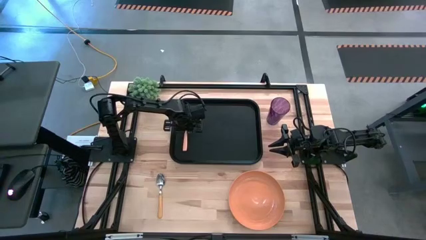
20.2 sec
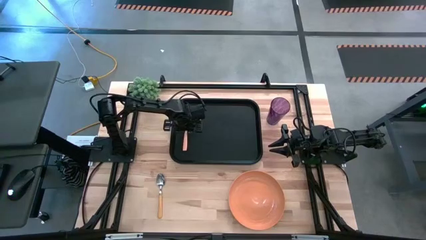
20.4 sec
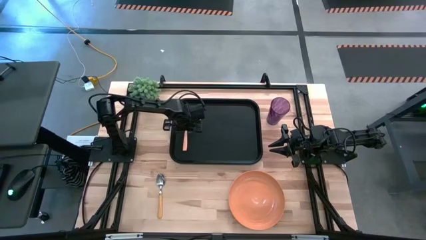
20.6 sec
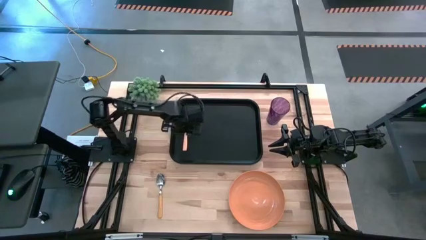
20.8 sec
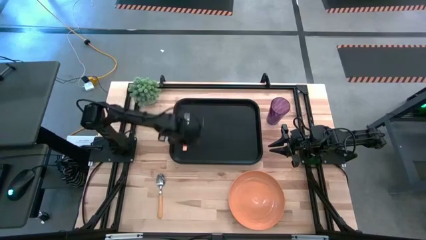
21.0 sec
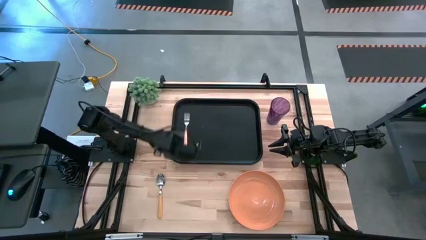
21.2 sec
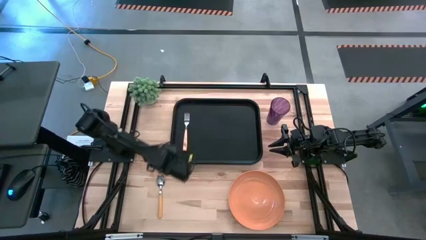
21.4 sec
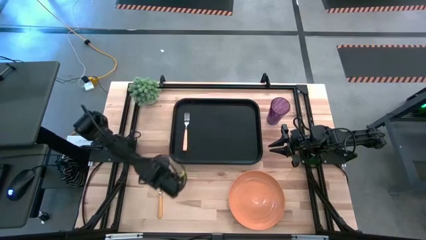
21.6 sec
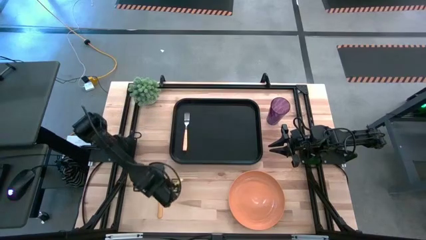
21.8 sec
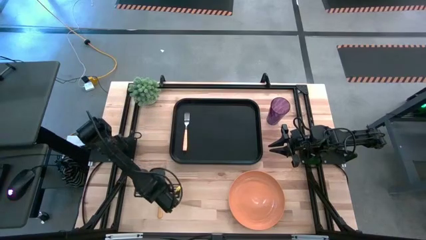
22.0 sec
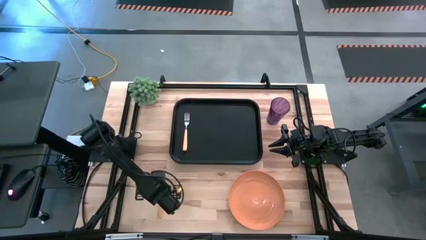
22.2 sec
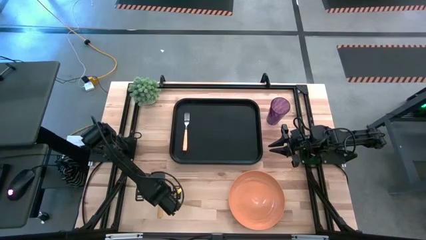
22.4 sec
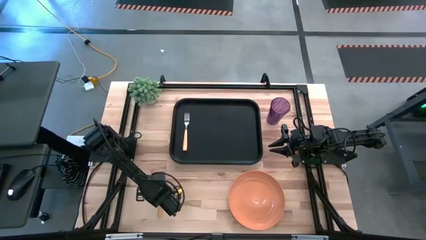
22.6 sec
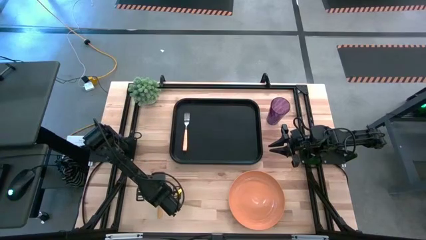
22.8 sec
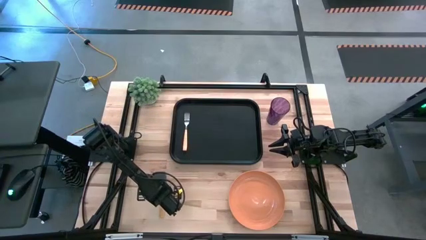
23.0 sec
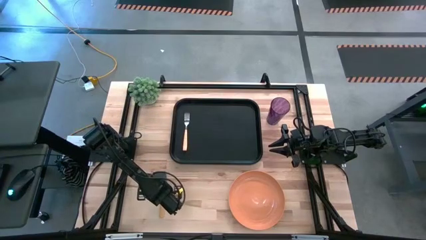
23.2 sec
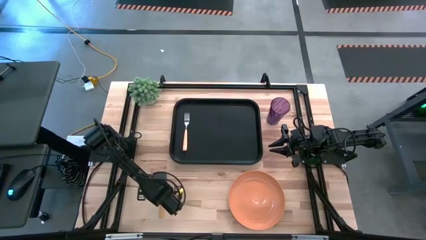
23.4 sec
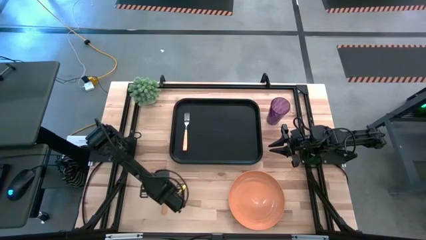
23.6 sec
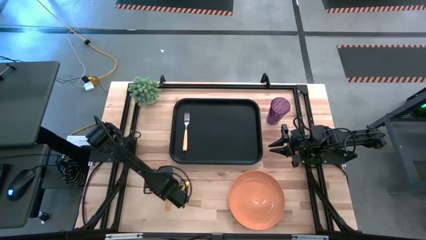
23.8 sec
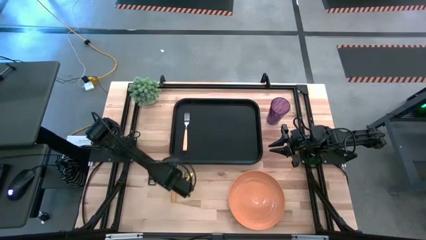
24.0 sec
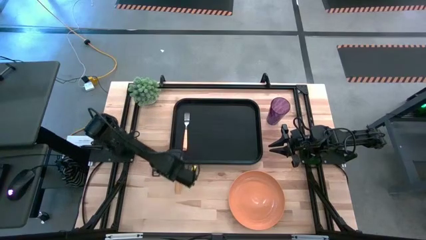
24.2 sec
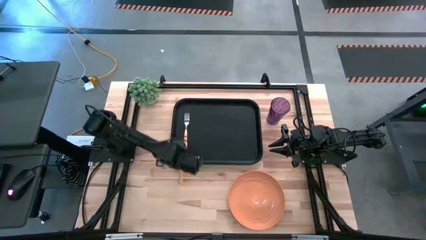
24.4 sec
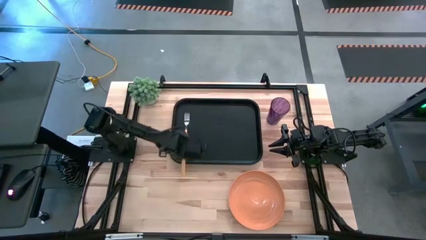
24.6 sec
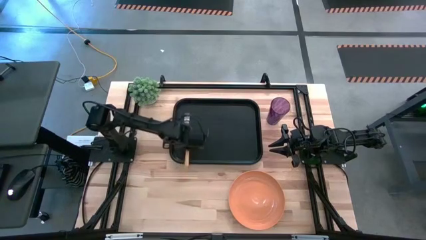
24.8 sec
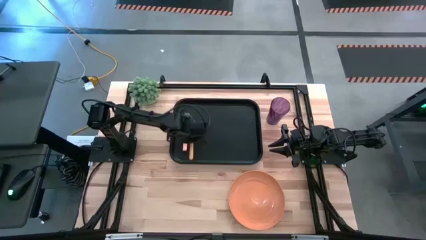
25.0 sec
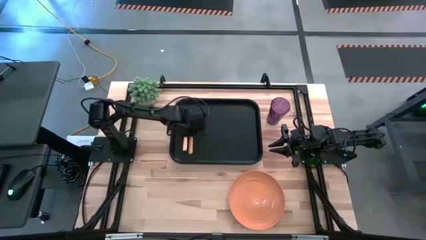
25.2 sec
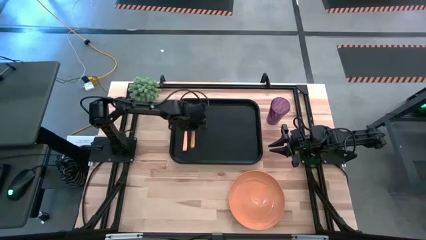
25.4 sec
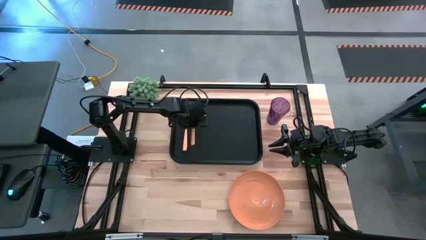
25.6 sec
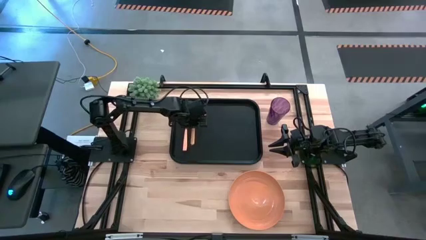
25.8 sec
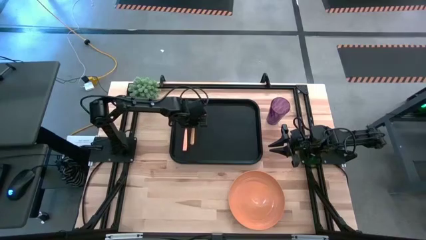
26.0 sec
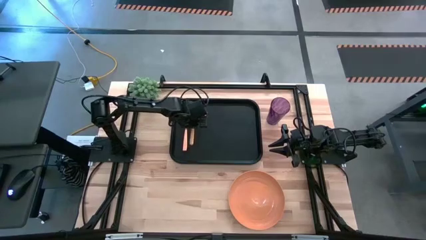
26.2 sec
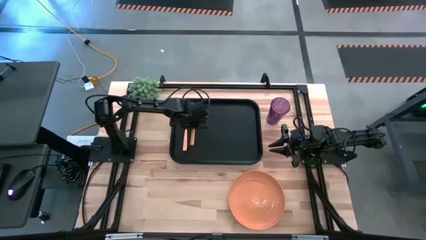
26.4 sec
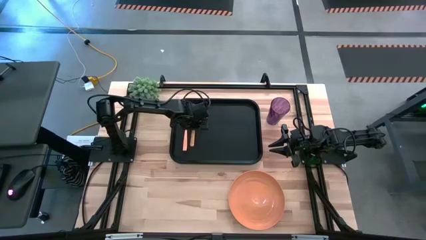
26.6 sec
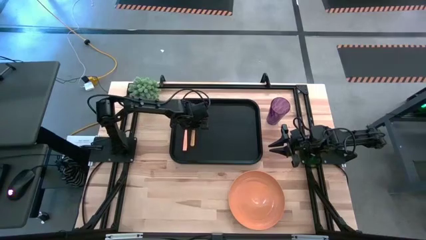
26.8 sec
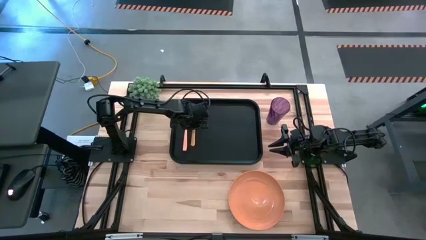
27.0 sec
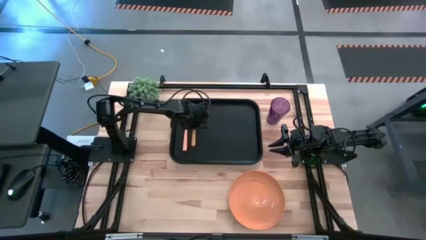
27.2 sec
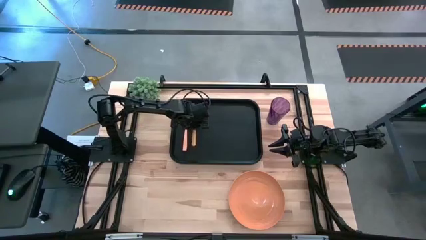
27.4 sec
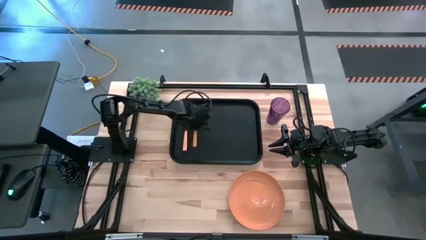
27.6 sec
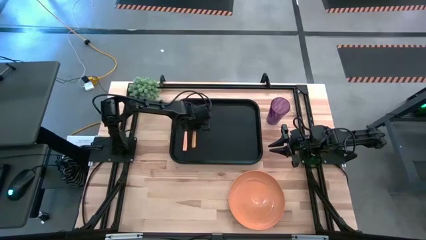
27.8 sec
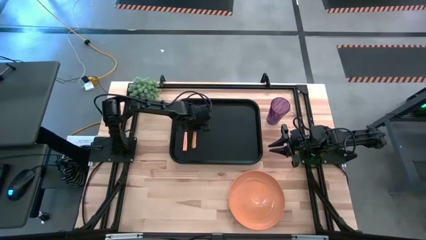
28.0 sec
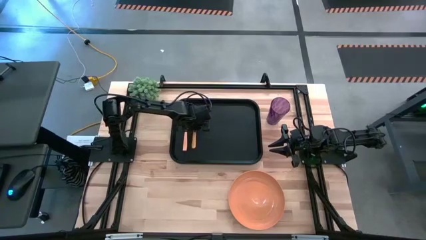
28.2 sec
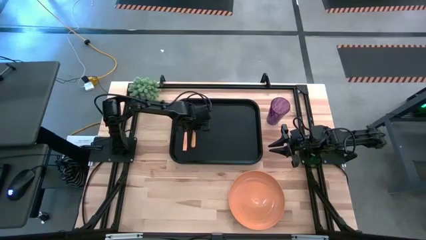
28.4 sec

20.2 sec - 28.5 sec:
Task: Pick and place plate/cup/fork/spoon on tray
Put the orange spoon into the black tray on the right side of the fork

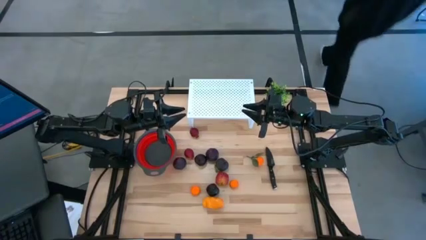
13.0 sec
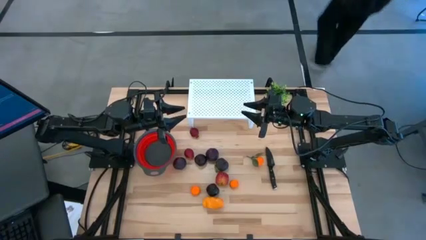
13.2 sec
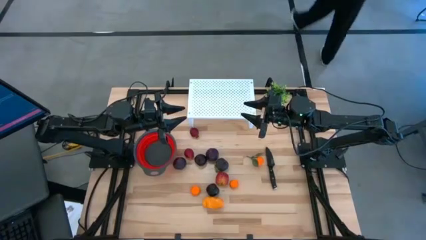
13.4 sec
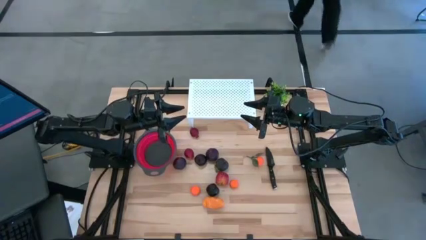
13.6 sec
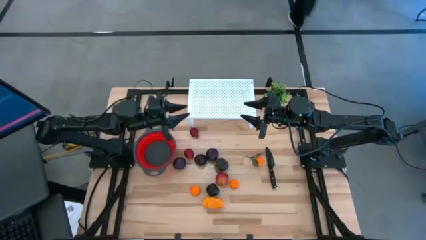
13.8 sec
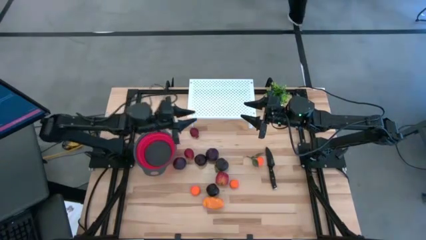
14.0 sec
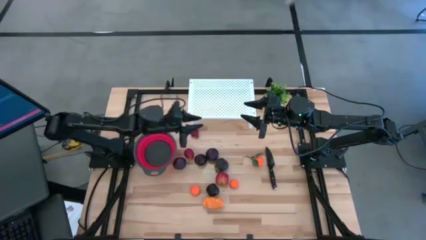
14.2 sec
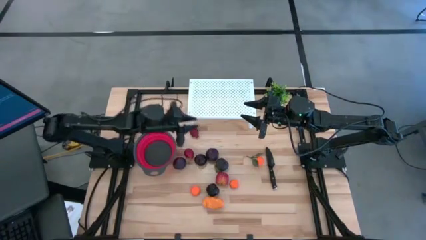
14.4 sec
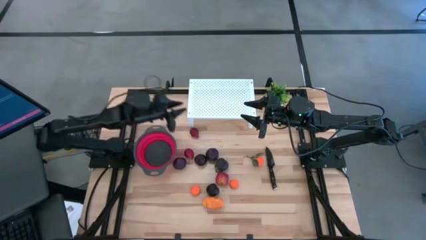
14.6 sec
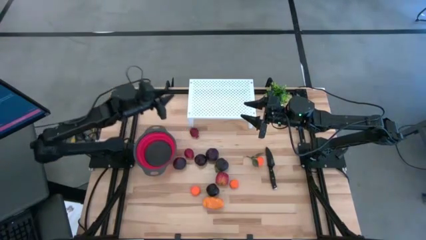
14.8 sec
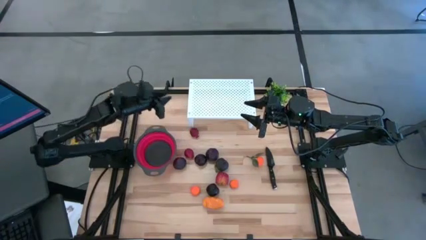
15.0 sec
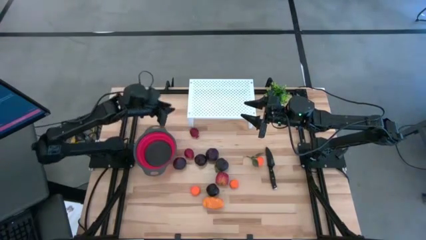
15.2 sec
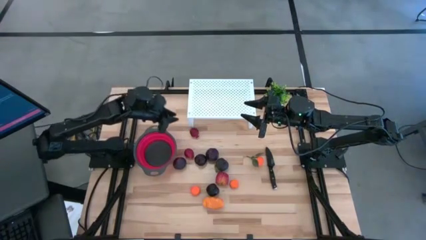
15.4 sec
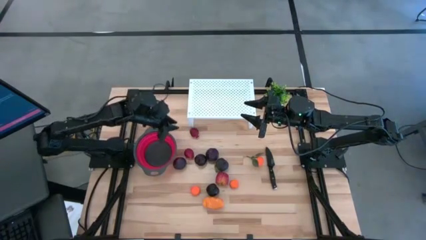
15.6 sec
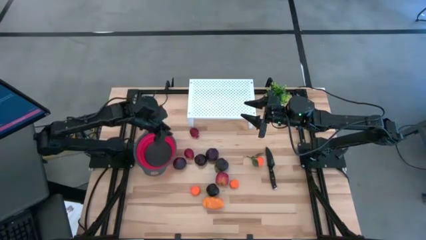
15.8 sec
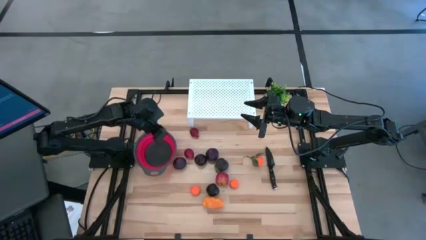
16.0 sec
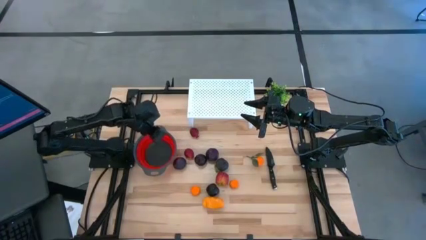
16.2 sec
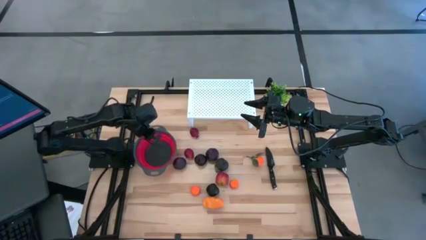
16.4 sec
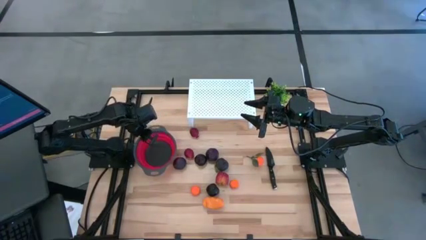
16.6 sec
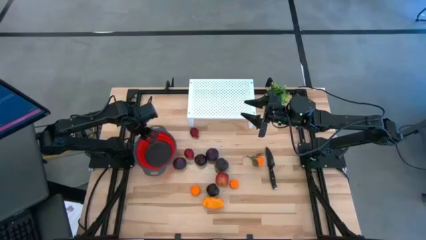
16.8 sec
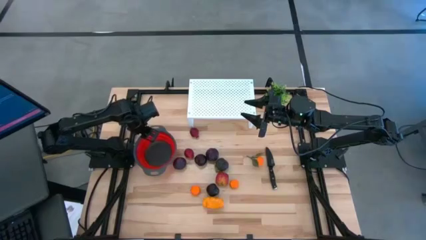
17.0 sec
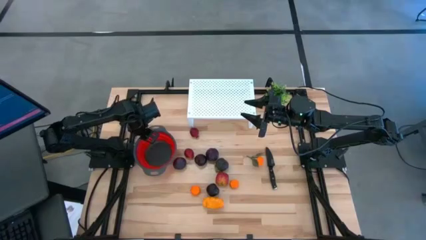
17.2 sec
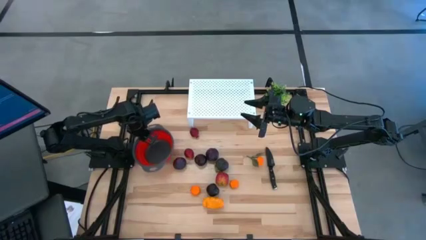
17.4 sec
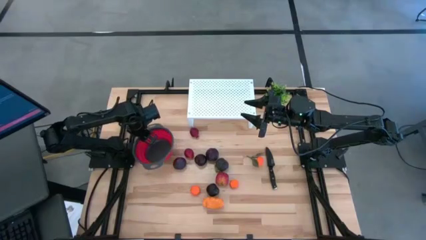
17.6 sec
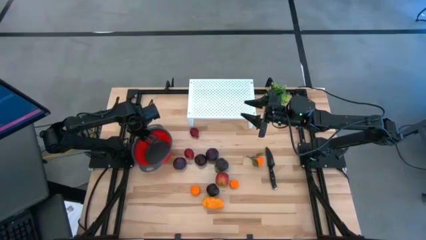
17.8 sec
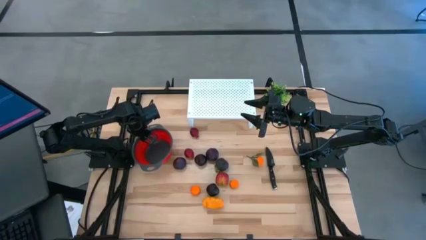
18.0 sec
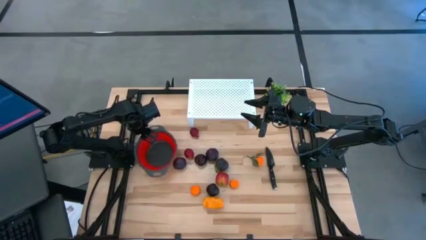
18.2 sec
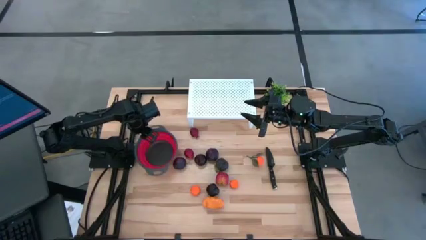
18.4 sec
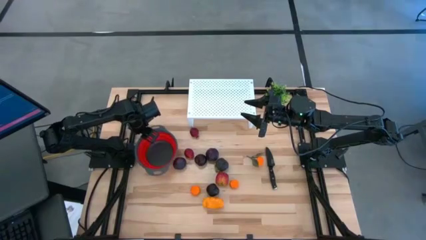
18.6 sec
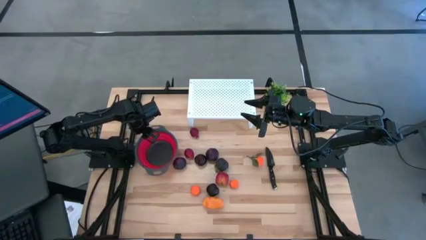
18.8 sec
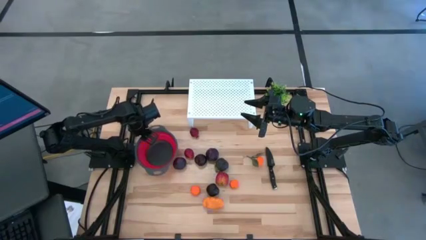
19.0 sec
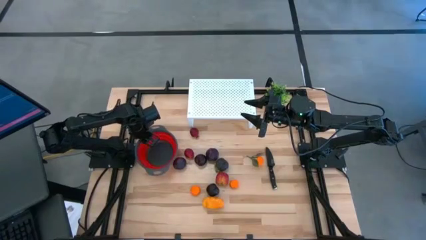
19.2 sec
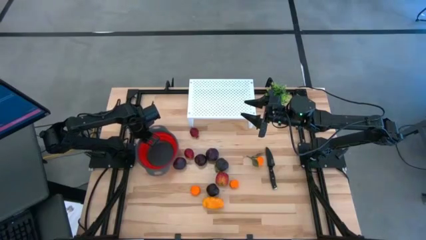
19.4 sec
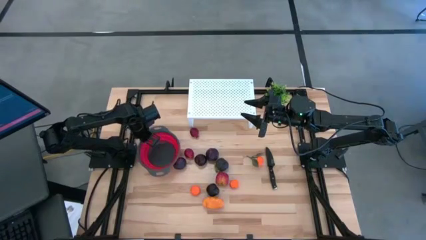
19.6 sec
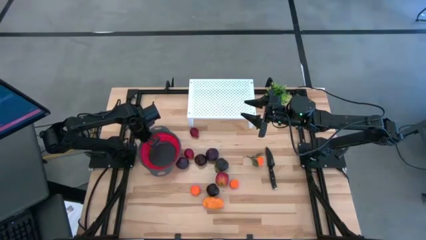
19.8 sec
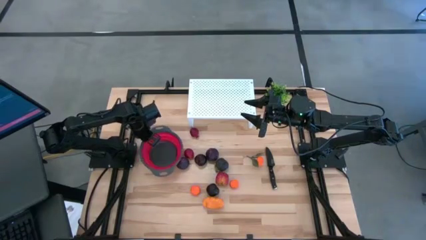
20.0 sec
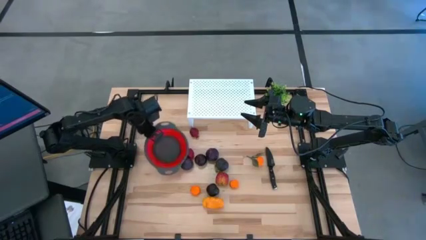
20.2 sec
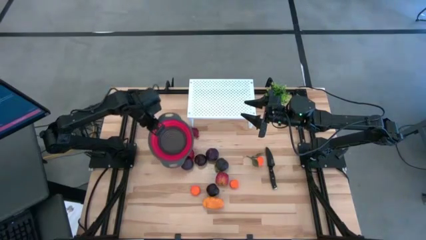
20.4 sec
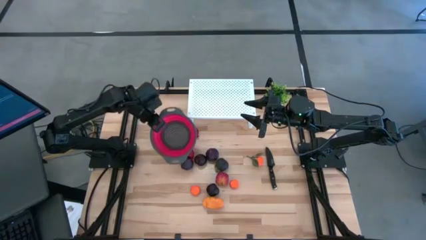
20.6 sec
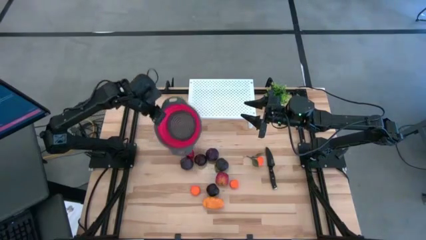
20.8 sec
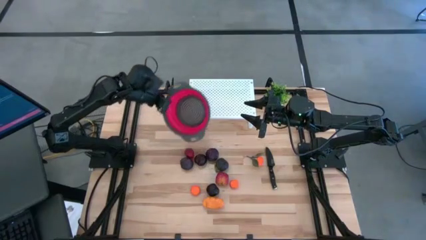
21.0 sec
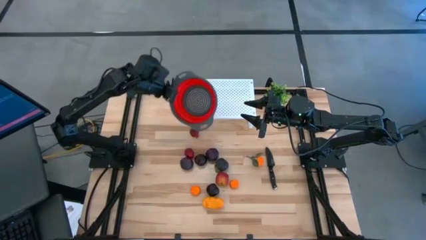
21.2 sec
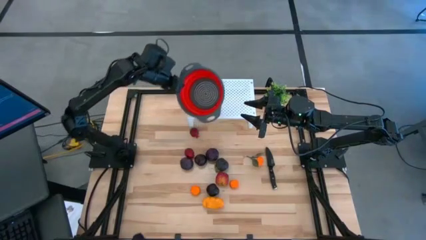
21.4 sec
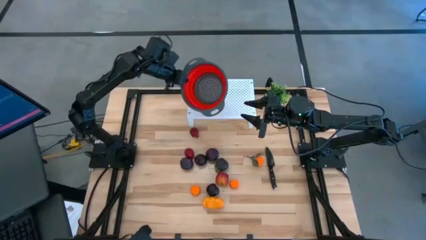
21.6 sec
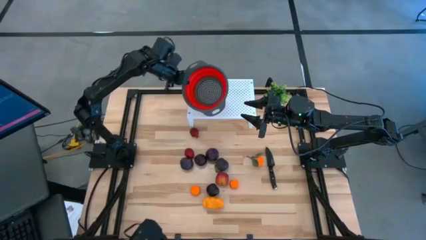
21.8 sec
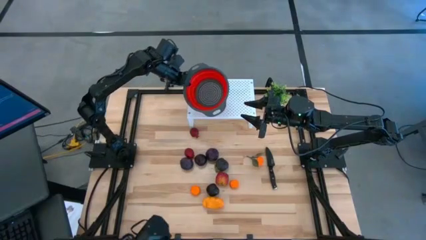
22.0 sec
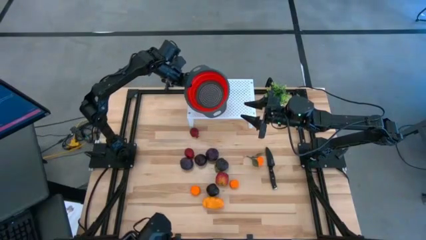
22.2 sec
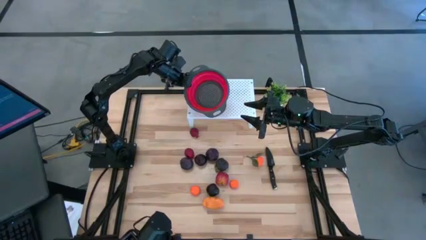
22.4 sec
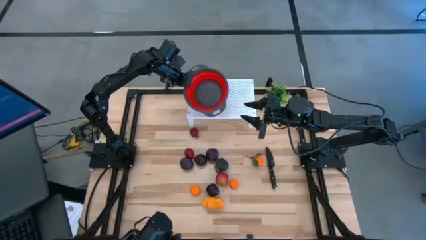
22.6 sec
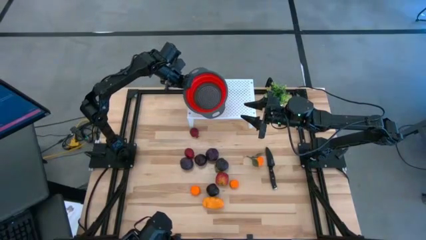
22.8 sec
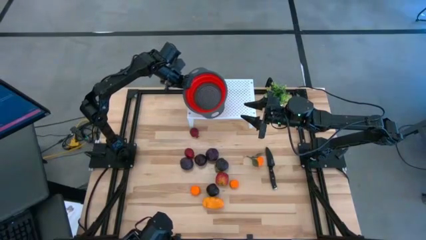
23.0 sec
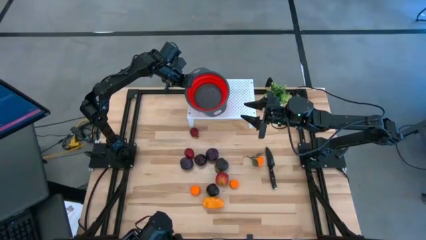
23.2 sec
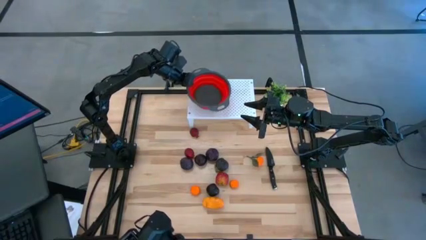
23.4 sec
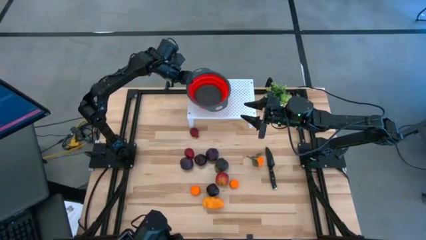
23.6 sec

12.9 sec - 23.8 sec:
Task: Pick & Place Fruit
Put the strainer bowl on the left side of the shelf
